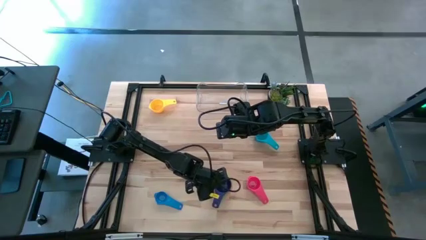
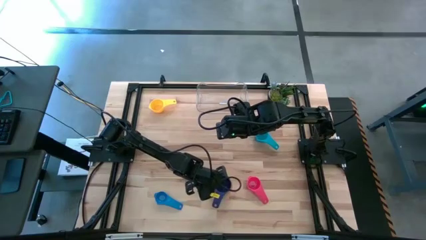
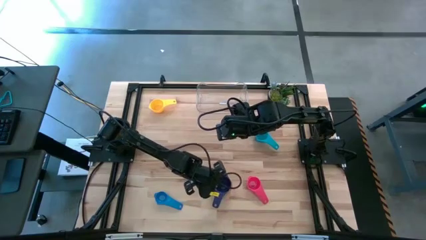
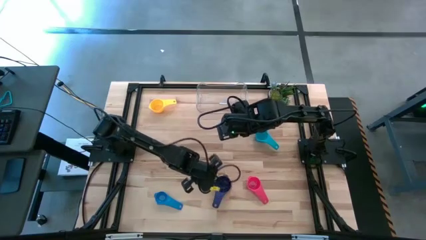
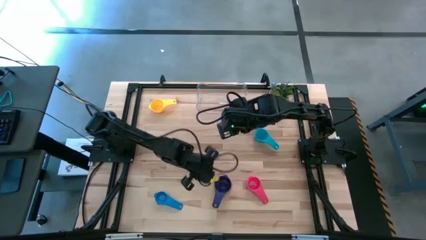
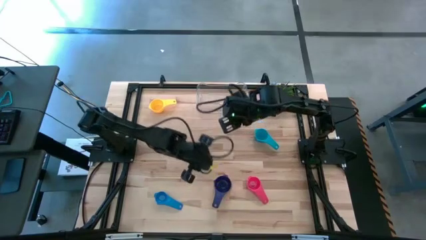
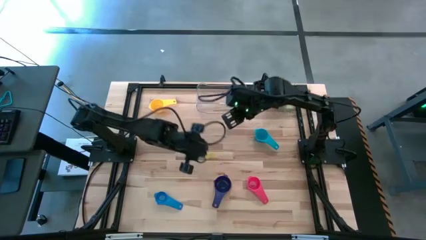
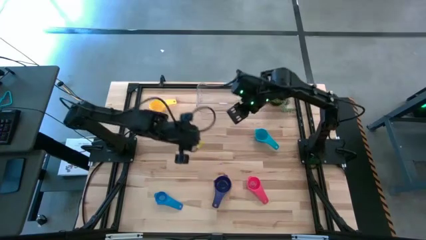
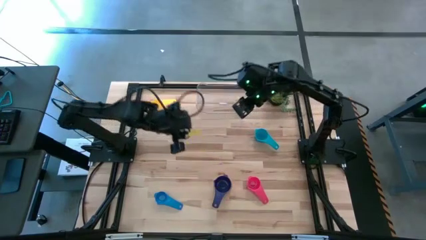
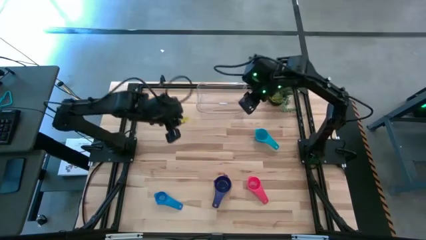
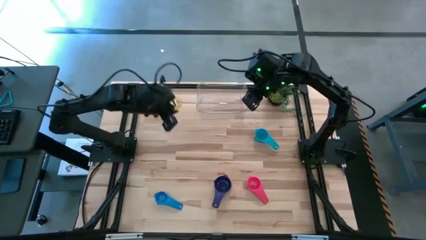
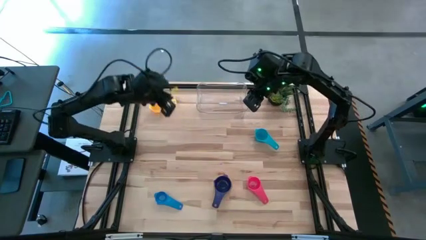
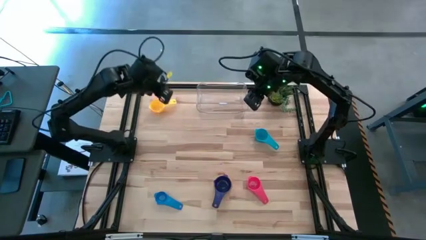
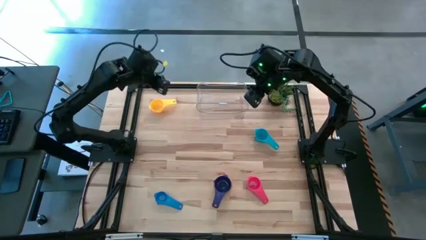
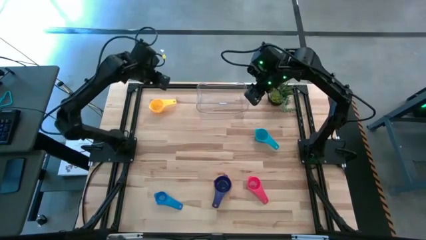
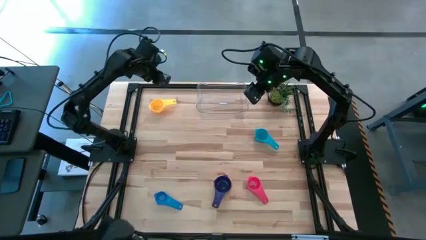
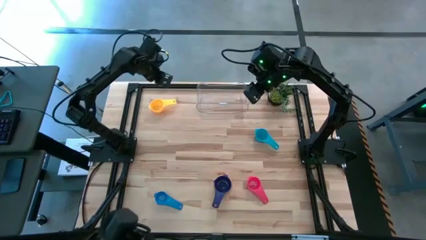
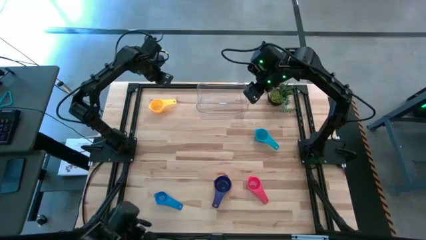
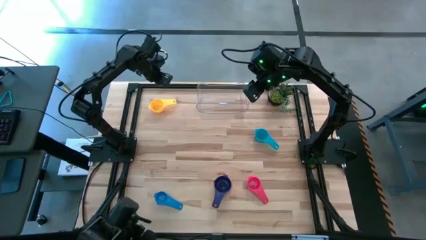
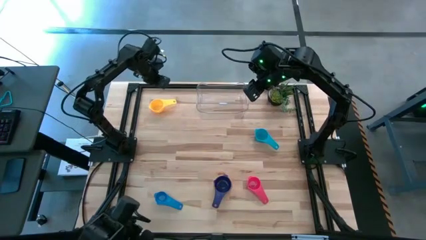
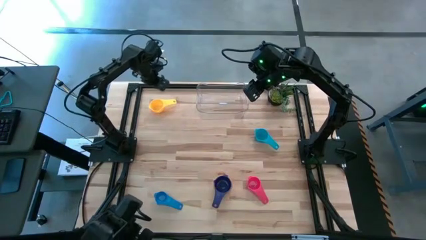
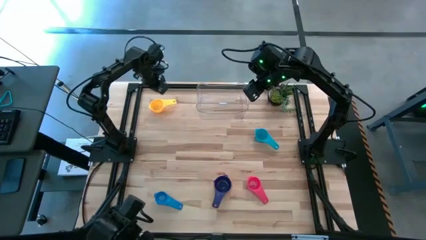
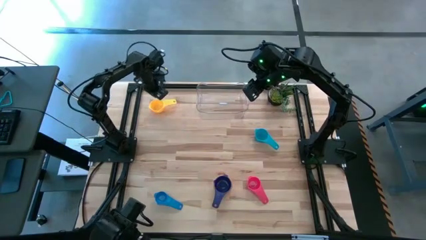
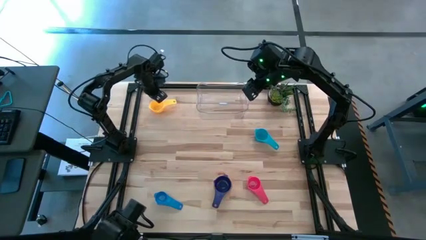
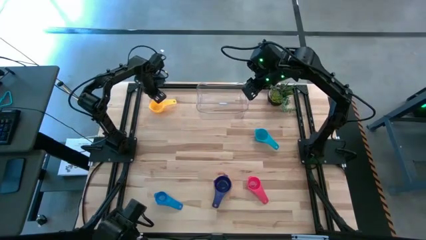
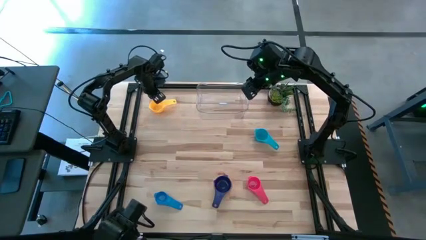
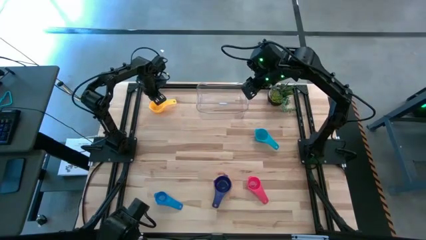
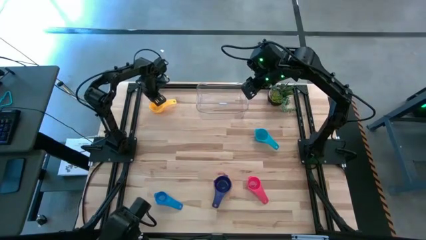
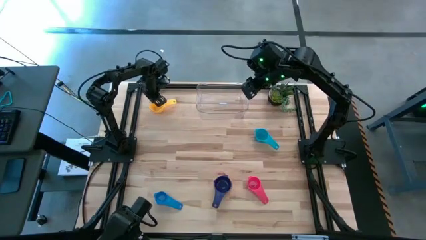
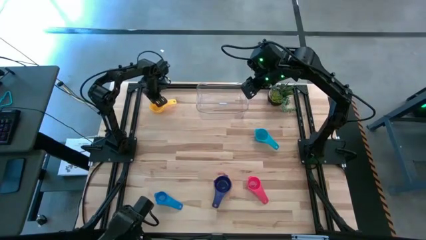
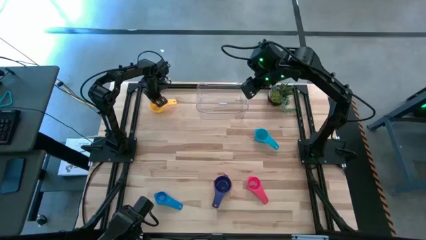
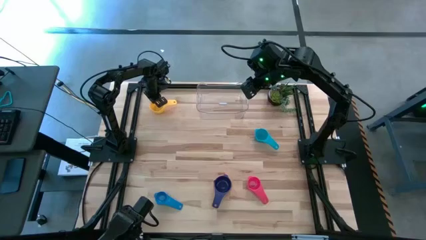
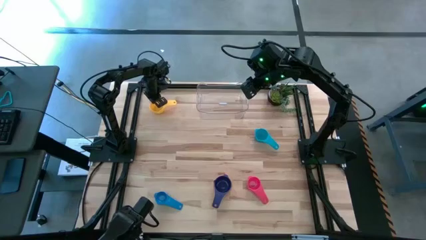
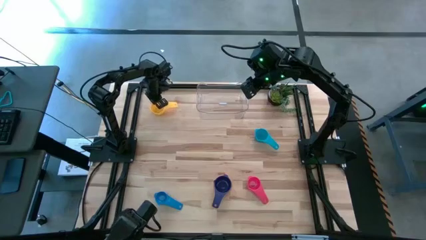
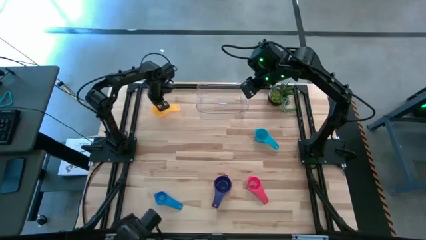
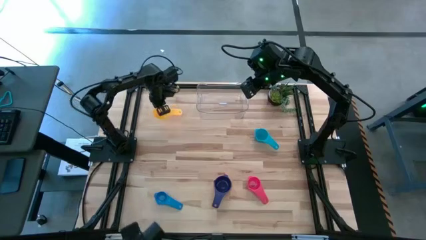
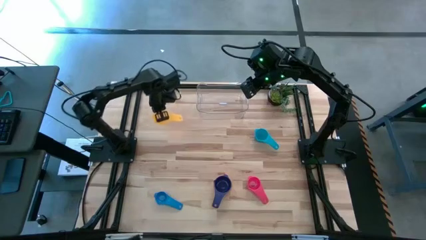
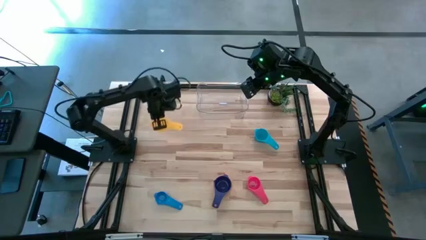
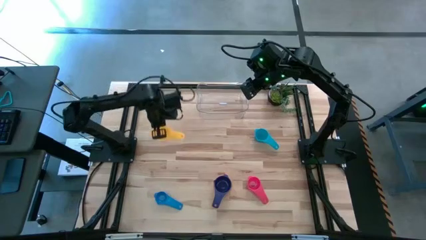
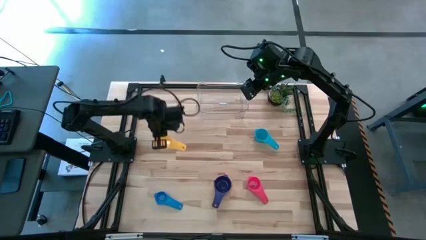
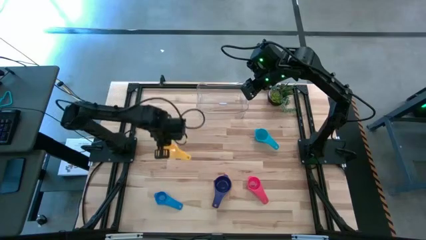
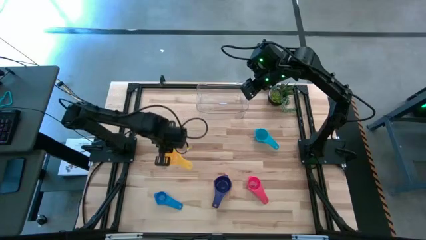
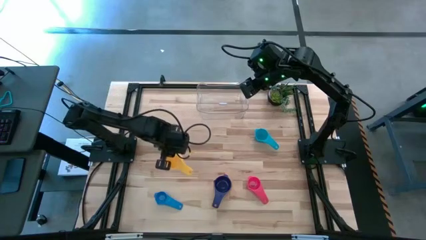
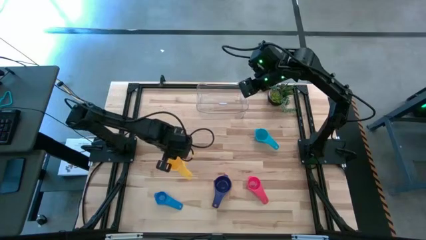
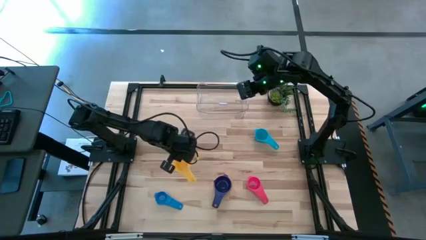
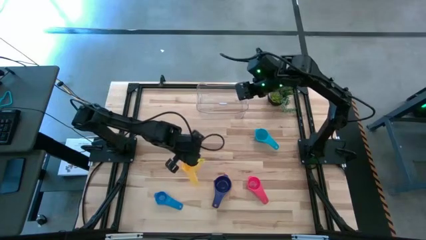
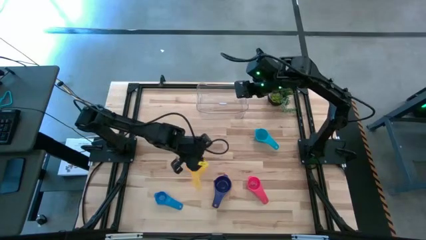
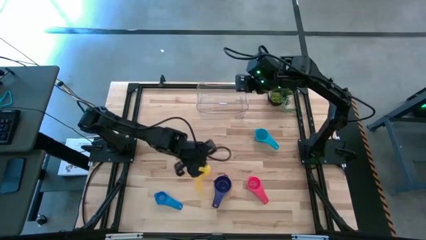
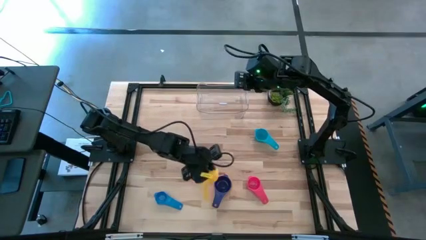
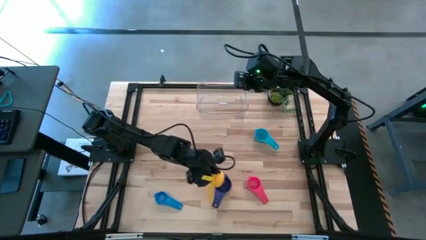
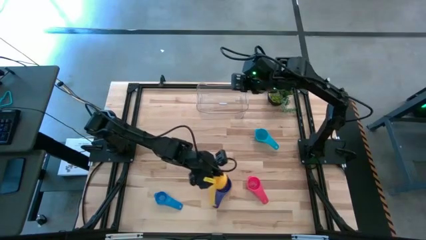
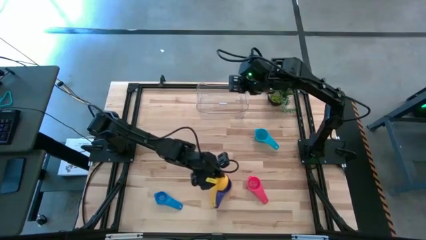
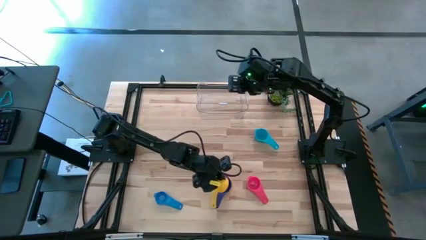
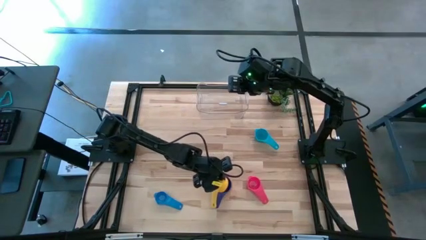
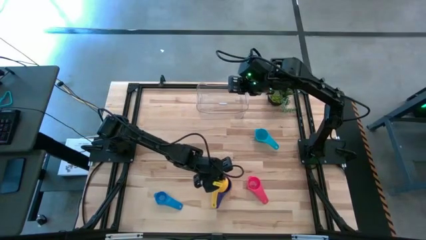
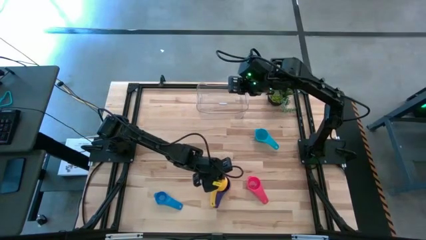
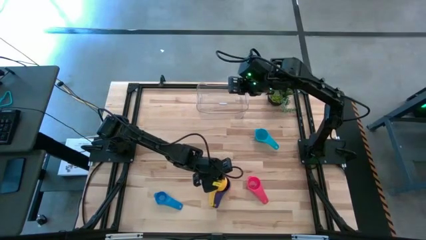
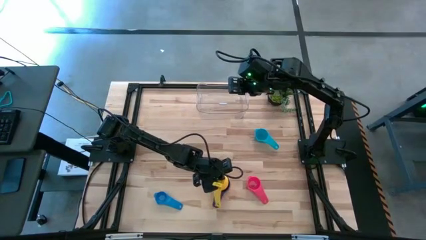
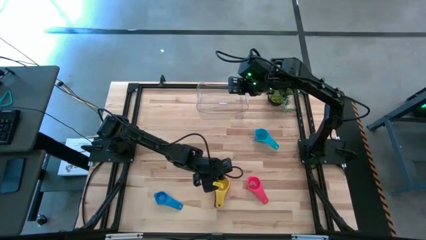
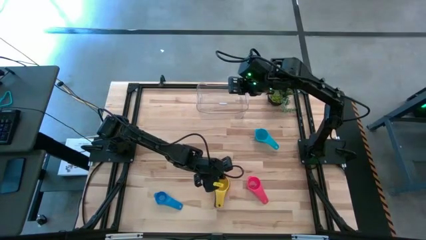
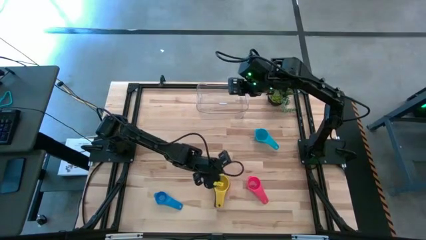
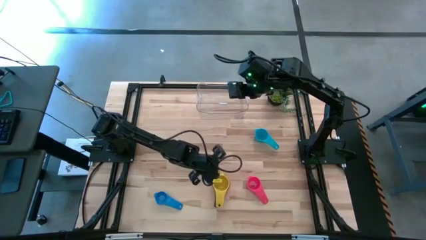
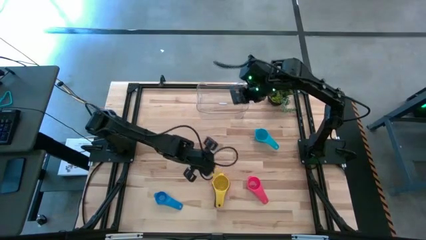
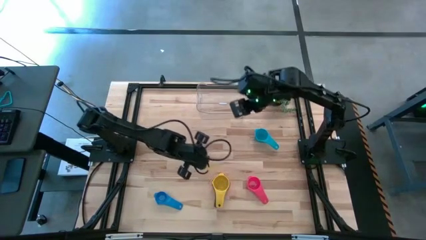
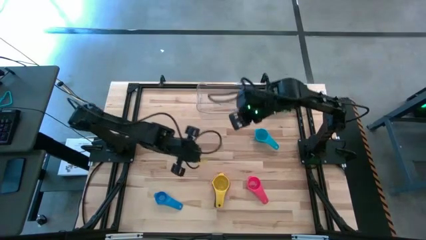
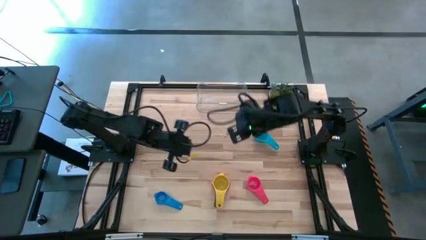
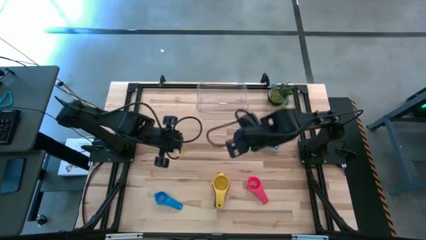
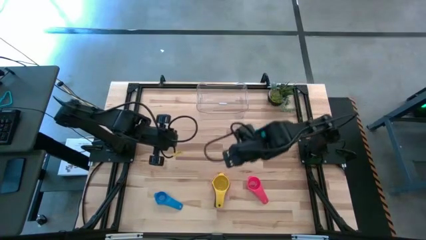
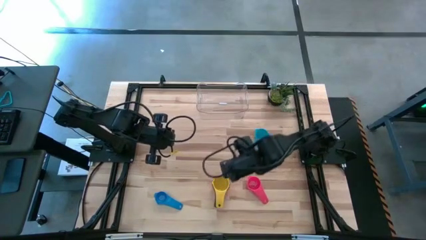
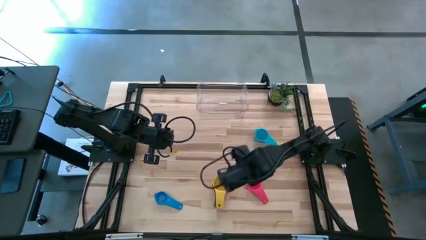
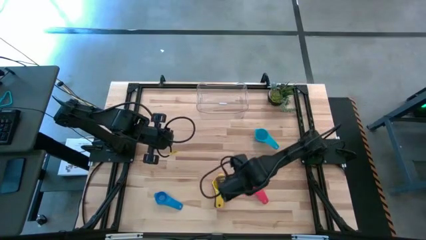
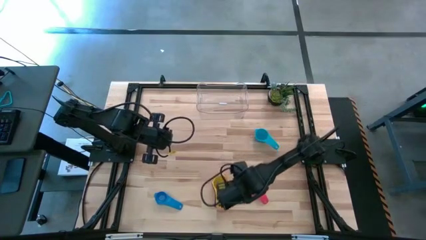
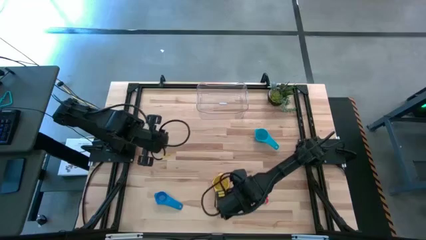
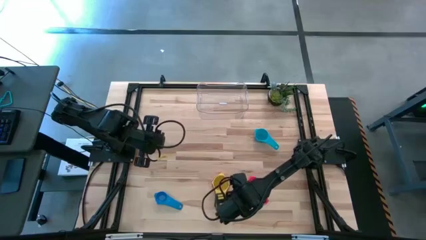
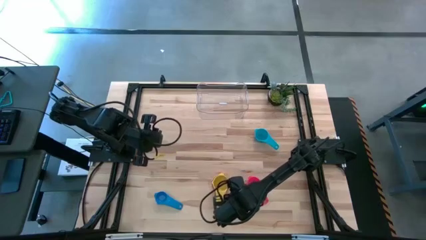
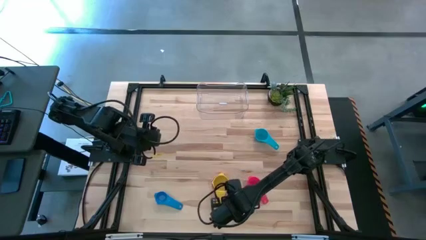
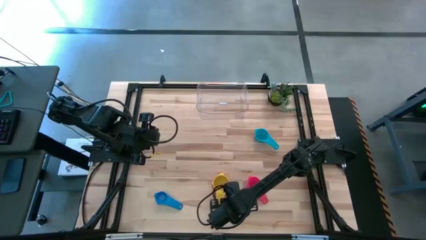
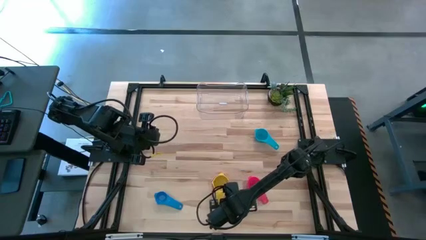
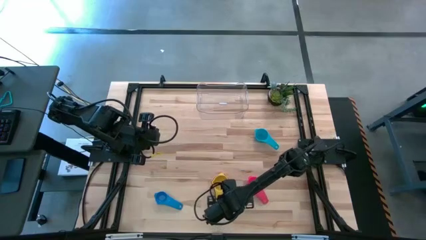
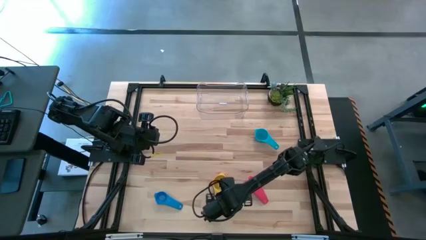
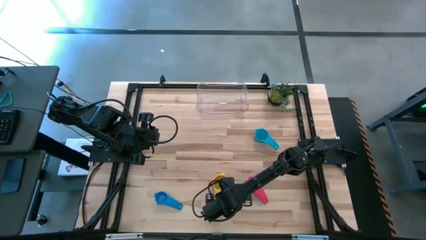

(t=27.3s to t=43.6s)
Task: Nest measuring cups in basket
Stack the yellow measuring cup on top of the dark blue measuring cup
